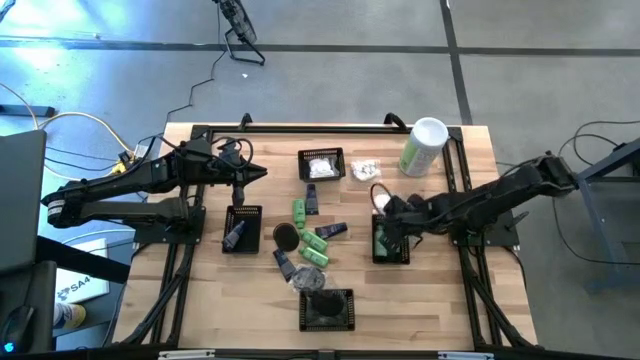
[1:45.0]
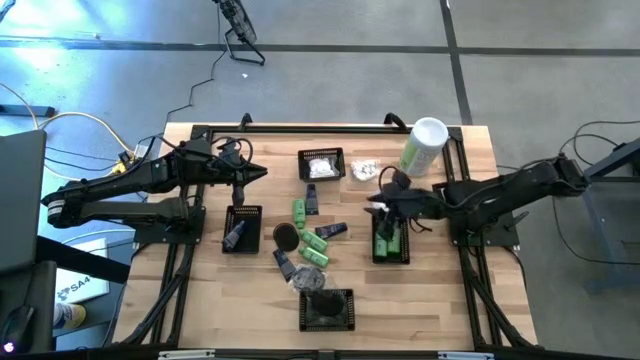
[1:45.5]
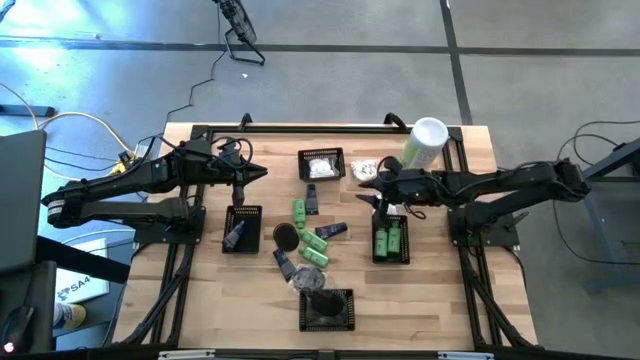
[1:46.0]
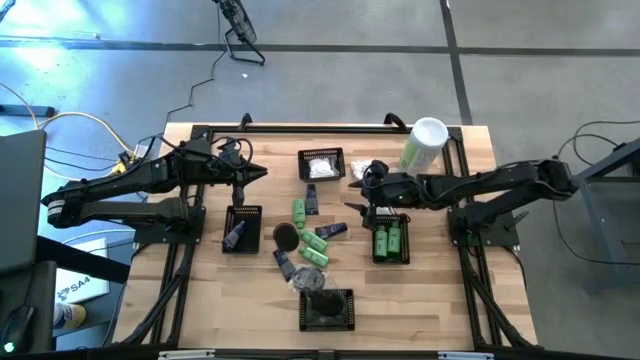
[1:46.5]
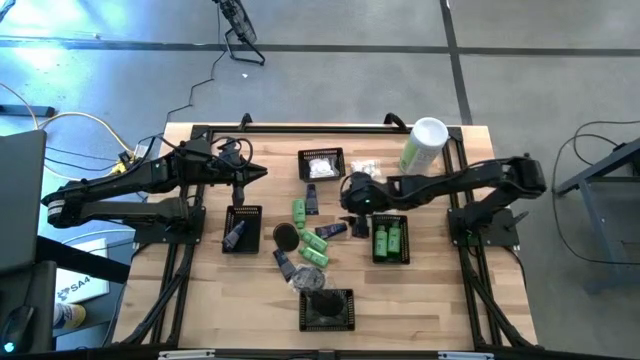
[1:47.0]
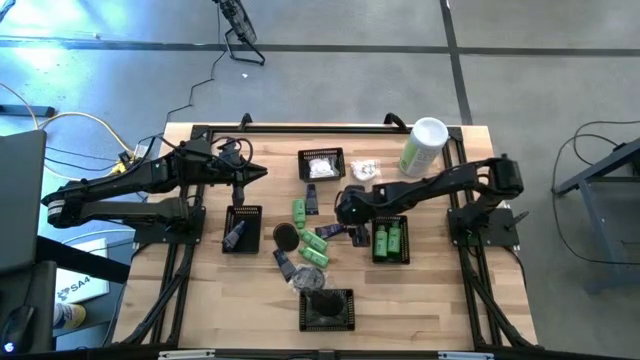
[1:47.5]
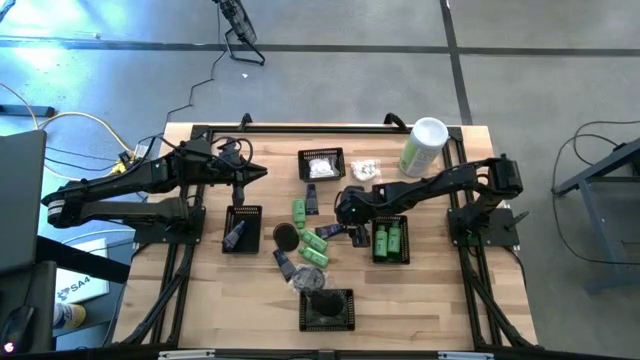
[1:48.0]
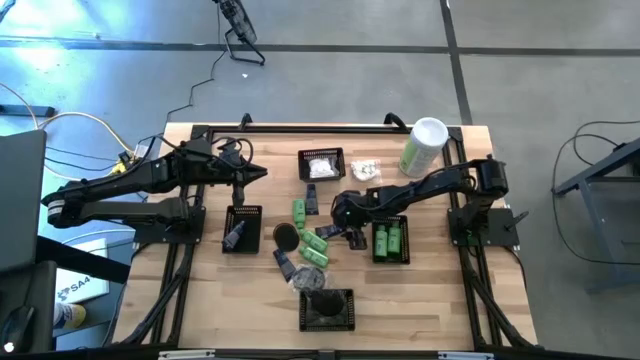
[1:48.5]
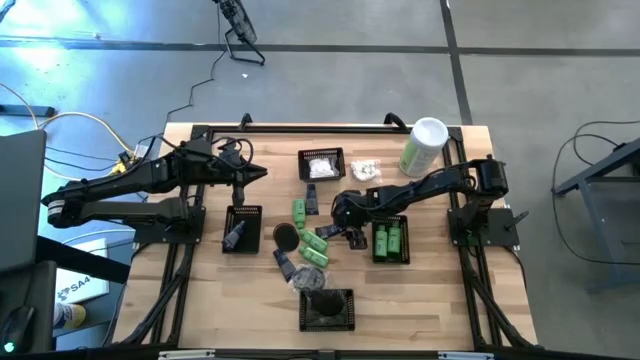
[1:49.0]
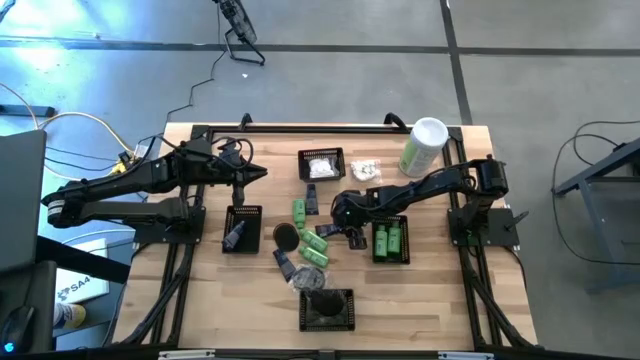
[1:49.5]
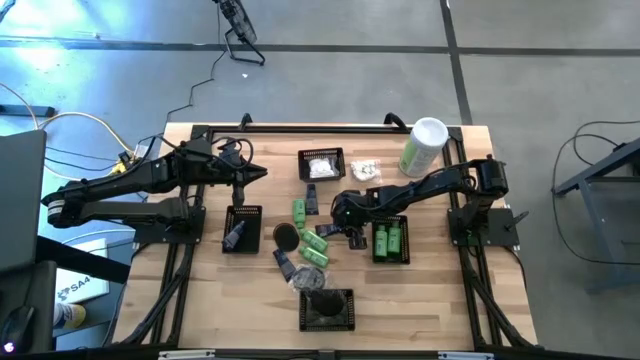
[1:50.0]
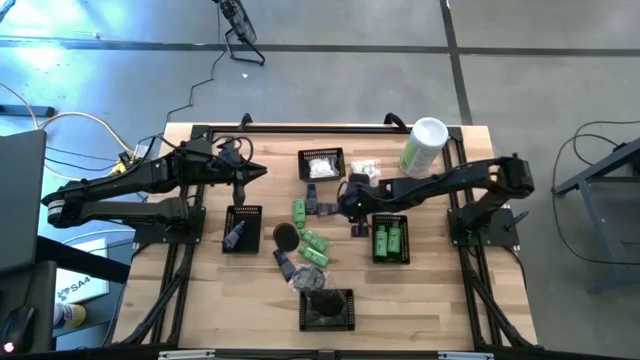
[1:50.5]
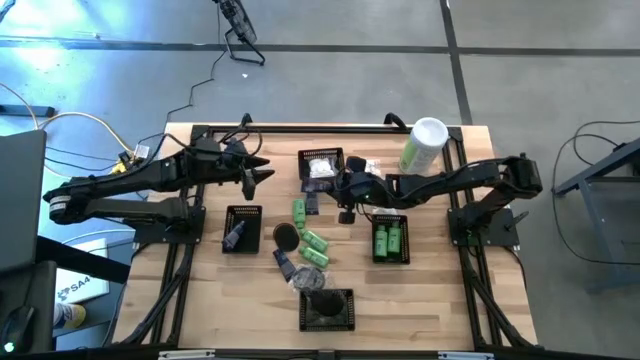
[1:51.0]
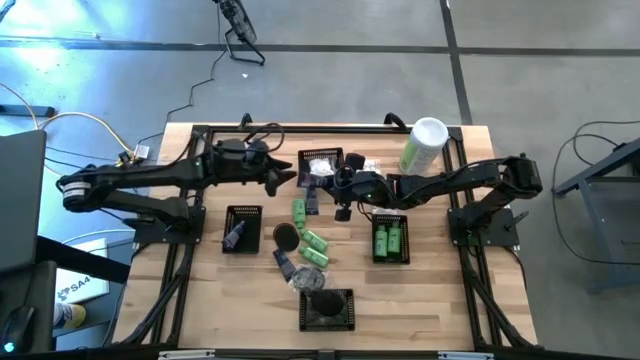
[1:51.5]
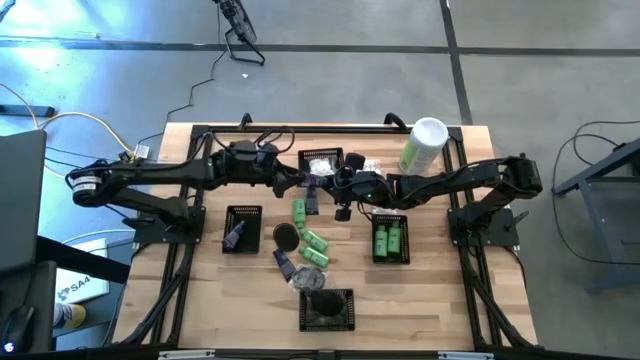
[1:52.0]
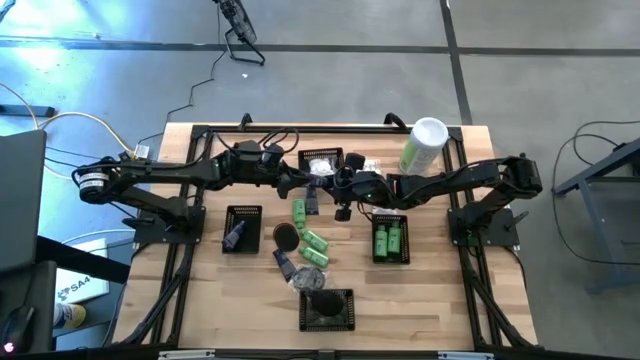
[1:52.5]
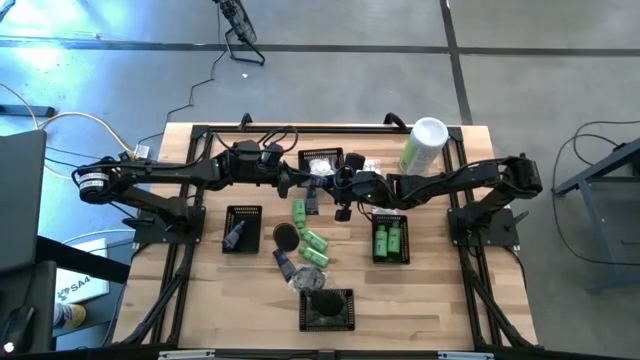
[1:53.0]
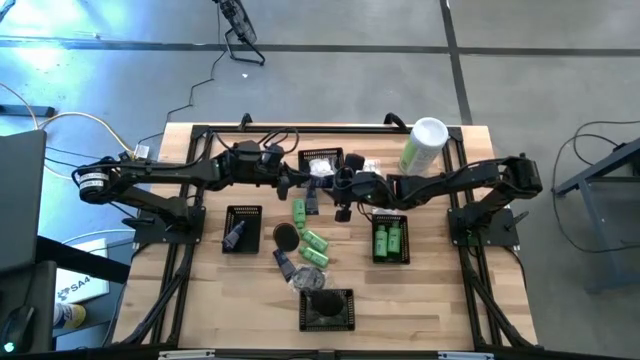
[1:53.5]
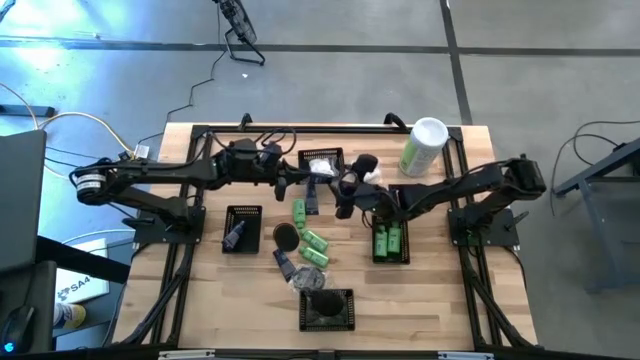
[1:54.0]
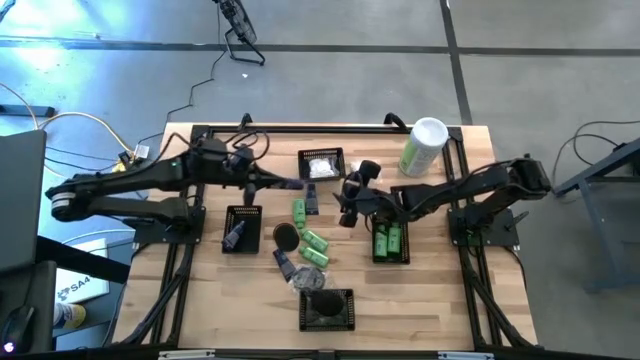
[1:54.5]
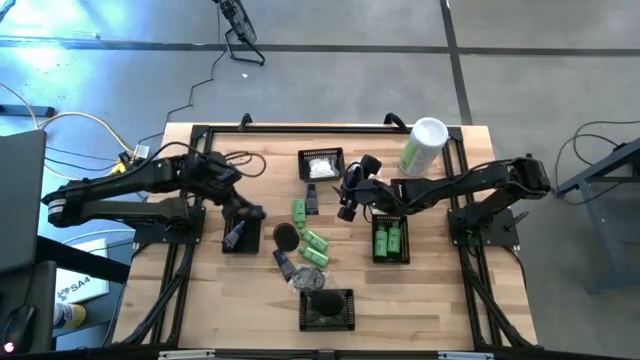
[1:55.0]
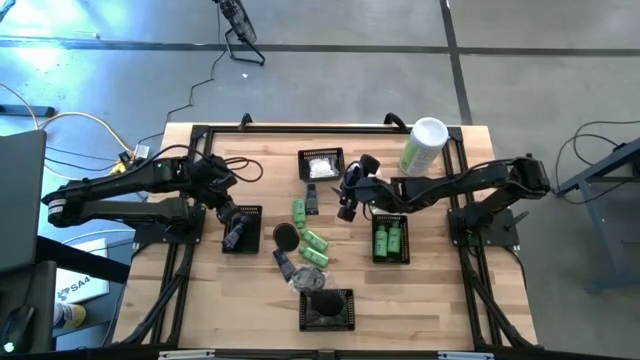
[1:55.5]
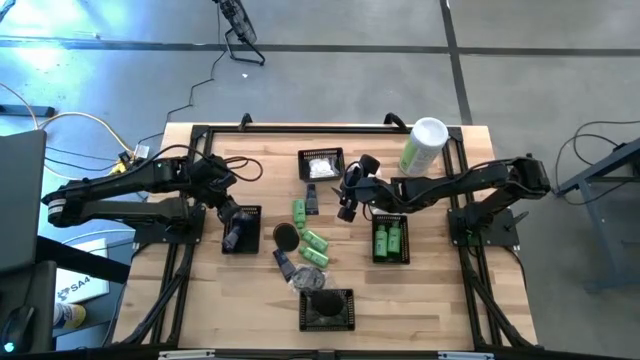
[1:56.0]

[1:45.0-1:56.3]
Task: Pick & Place Travel size toiletries
Put the blue bottle into the middle left black bin

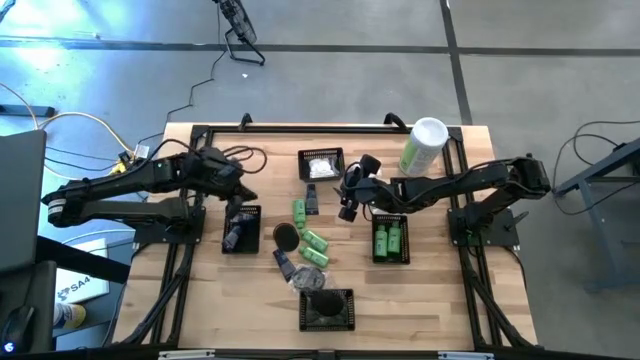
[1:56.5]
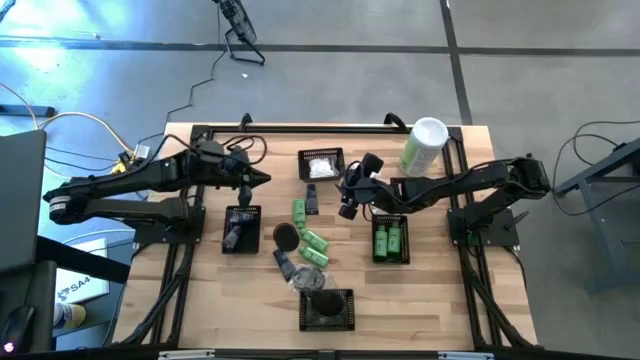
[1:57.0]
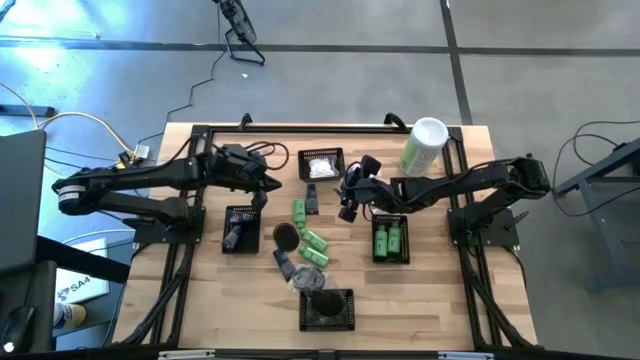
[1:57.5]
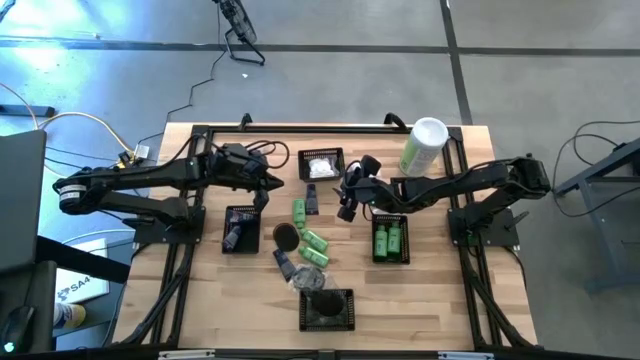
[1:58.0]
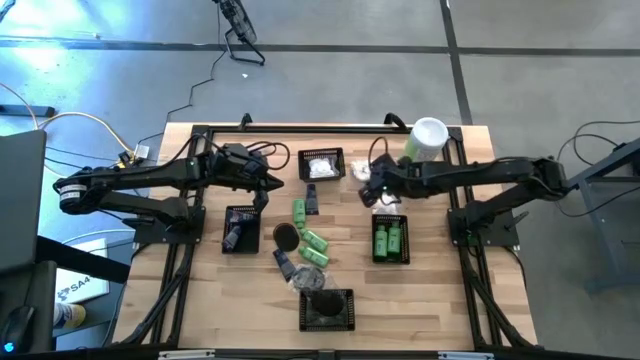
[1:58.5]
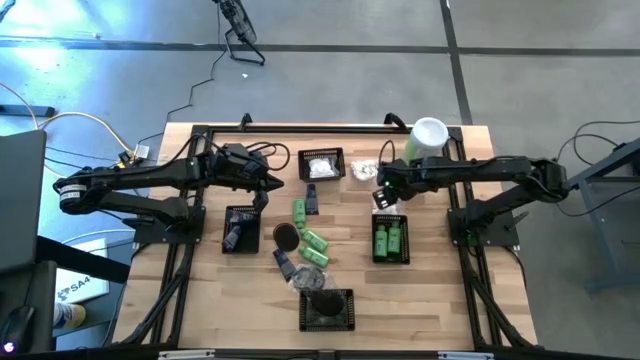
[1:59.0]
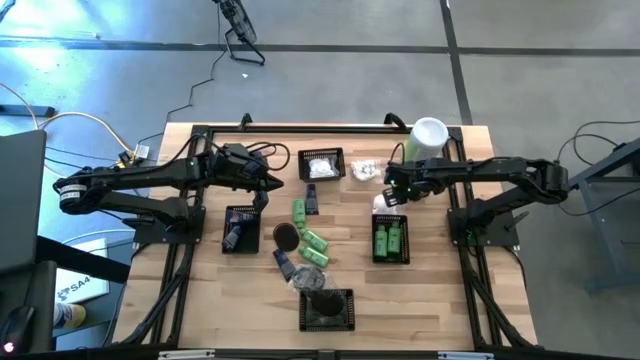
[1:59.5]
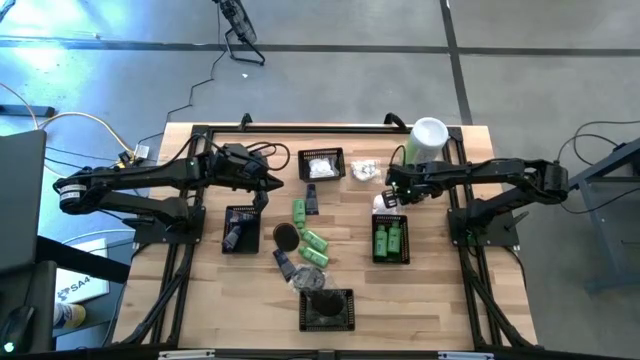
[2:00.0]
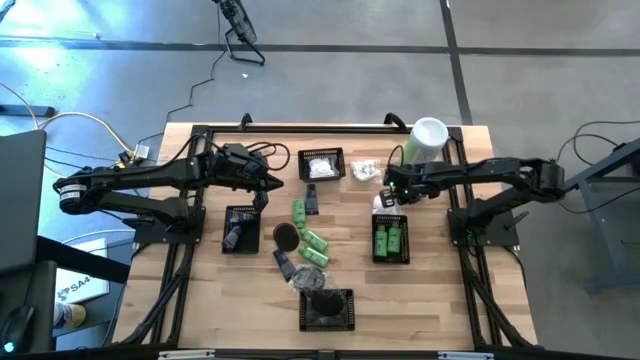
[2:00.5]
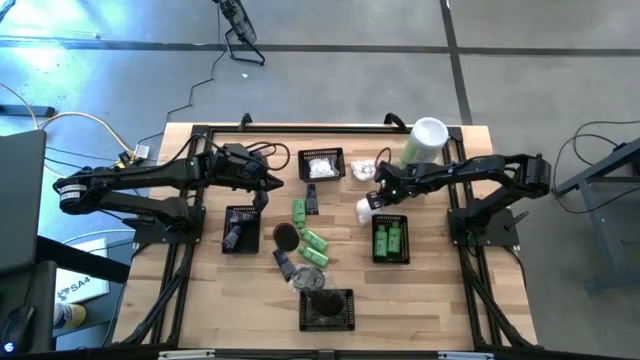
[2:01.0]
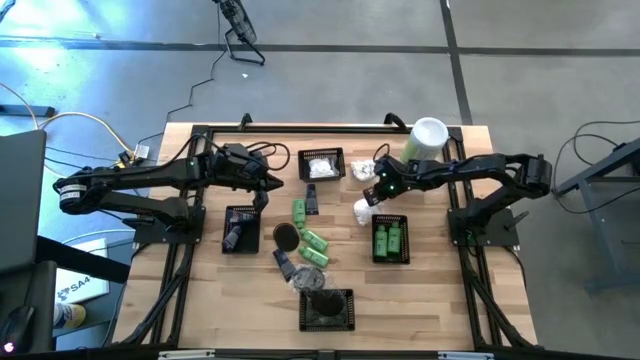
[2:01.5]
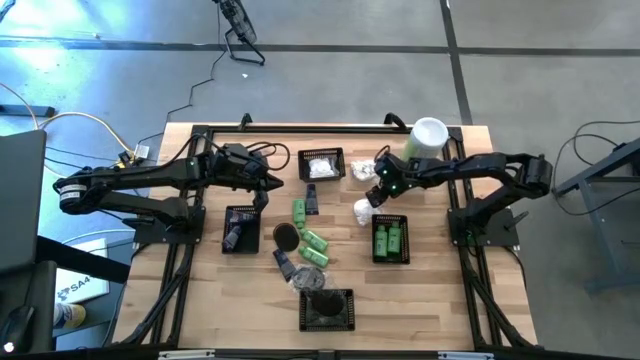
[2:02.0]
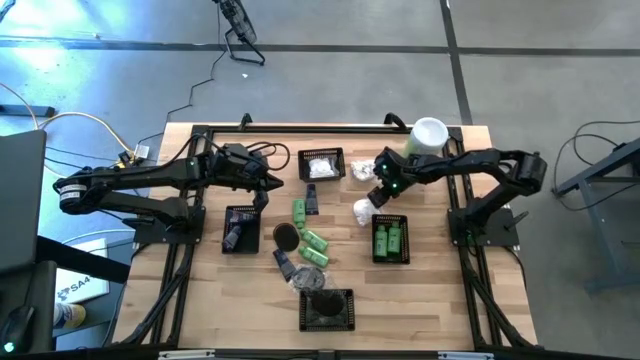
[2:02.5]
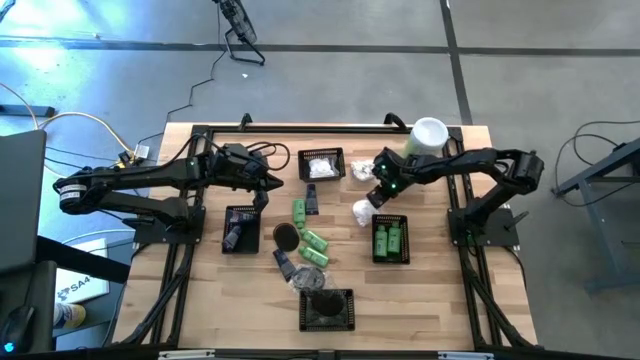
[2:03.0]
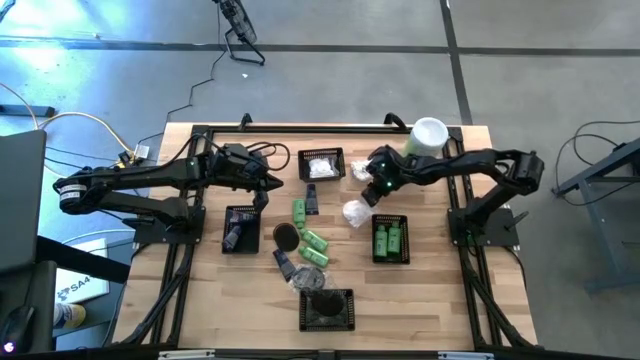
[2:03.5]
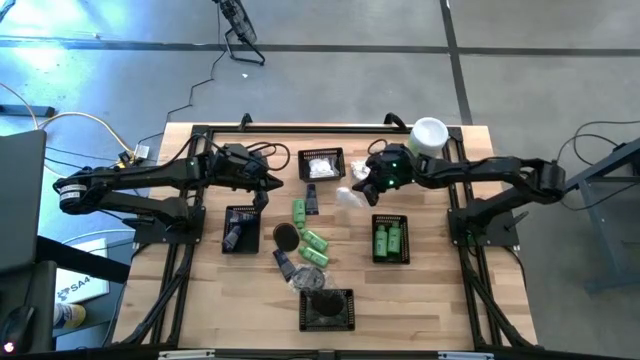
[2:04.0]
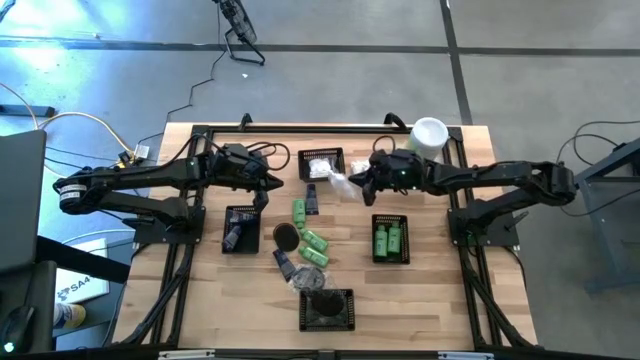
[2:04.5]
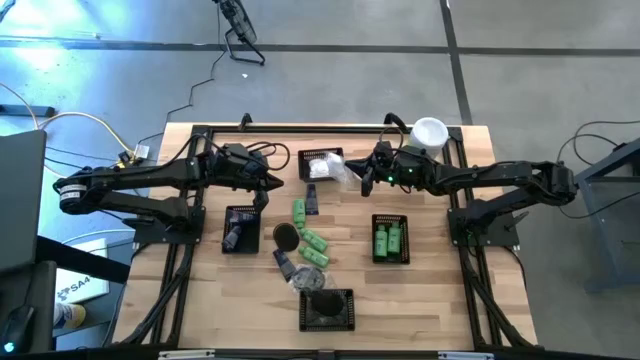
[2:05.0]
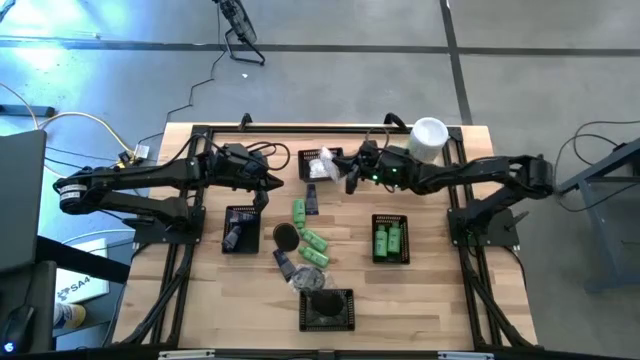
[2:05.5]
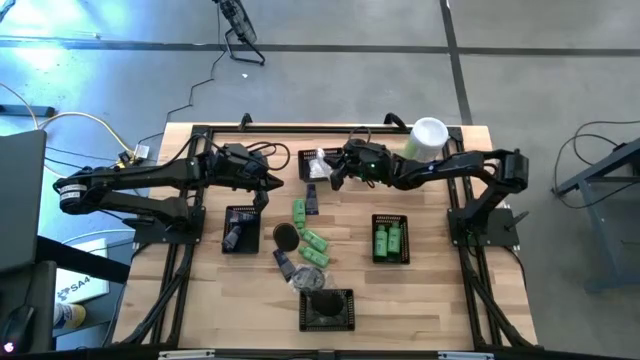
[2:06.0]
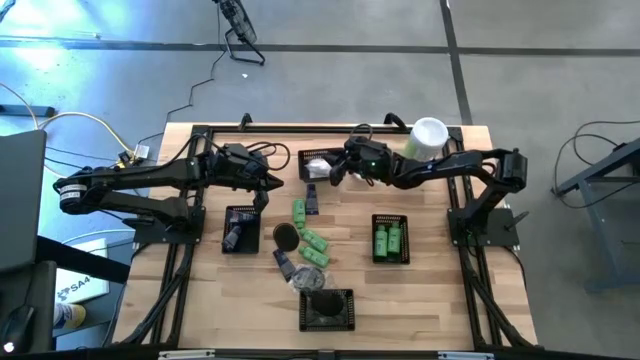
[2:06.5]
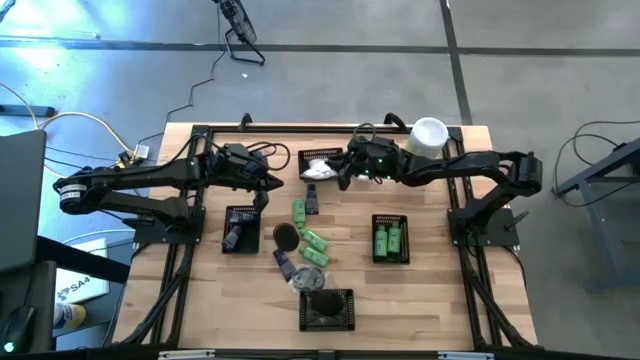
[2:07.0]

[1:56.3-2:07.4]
Put the bottom pack of cotton buds into the top middle black bin
